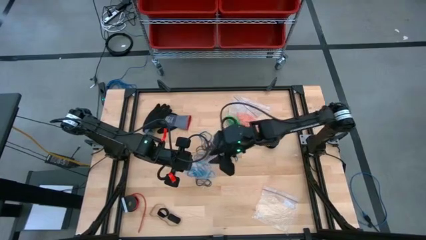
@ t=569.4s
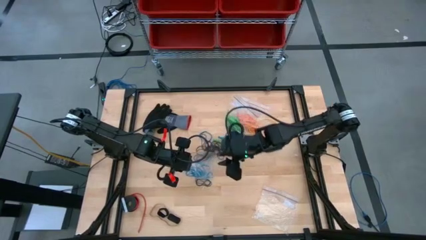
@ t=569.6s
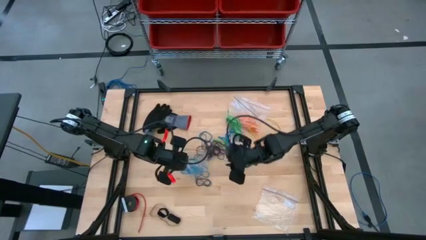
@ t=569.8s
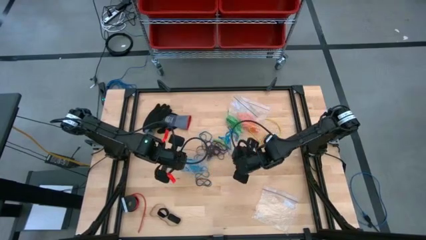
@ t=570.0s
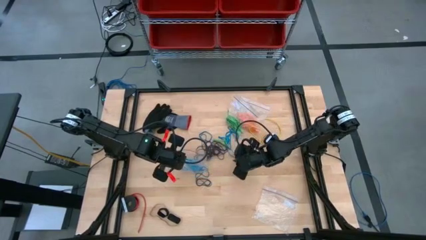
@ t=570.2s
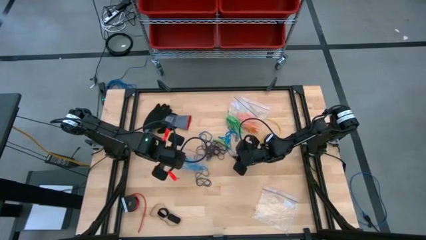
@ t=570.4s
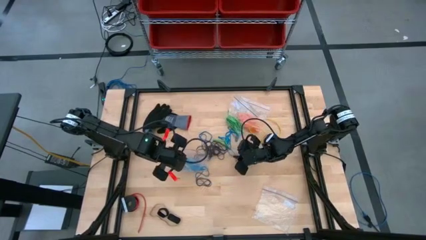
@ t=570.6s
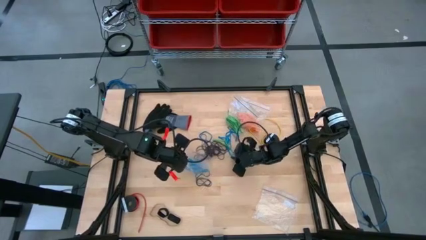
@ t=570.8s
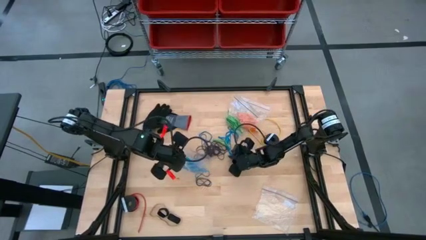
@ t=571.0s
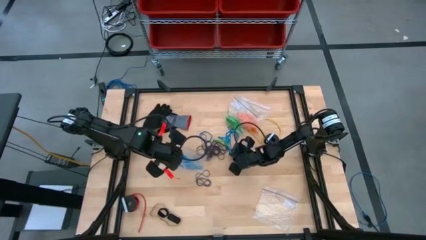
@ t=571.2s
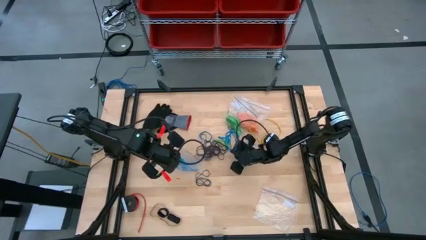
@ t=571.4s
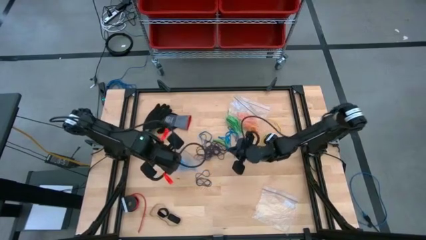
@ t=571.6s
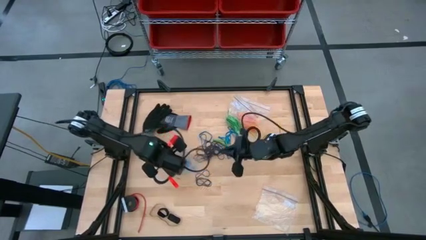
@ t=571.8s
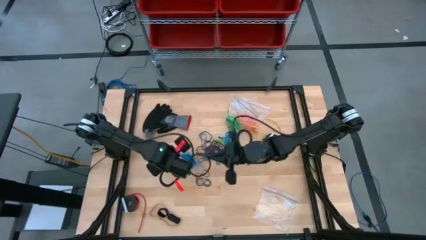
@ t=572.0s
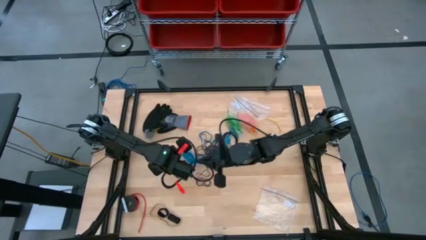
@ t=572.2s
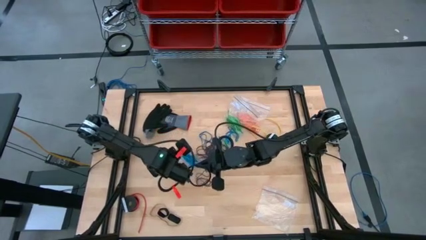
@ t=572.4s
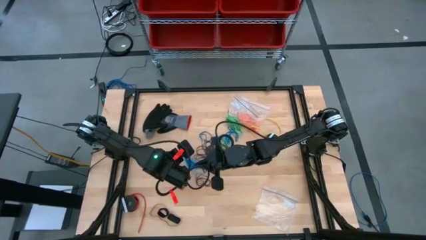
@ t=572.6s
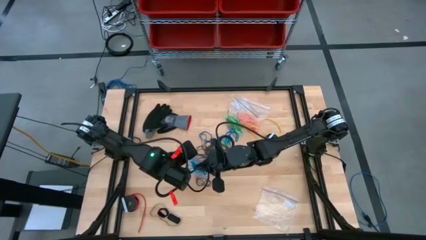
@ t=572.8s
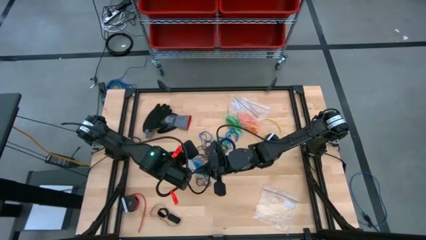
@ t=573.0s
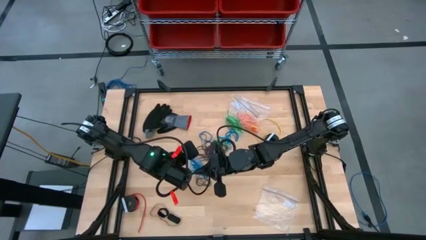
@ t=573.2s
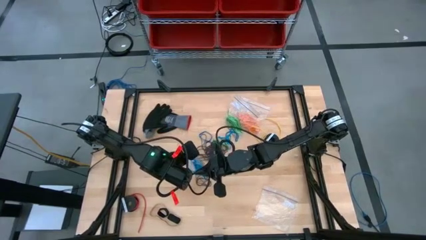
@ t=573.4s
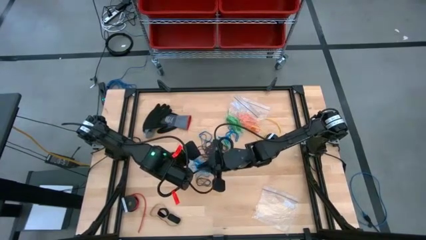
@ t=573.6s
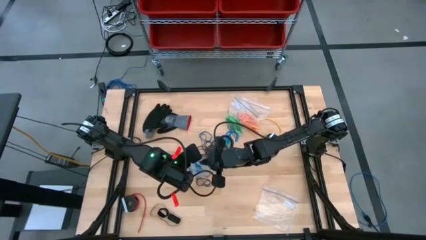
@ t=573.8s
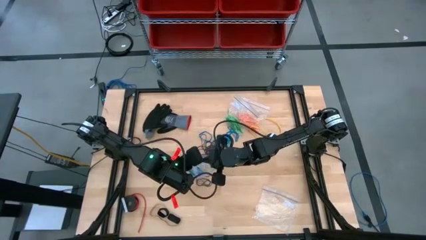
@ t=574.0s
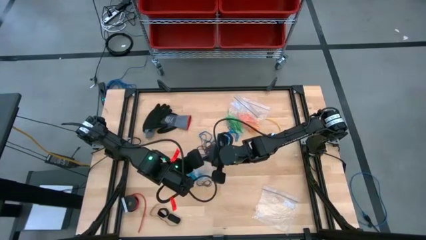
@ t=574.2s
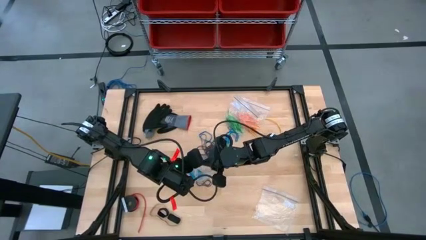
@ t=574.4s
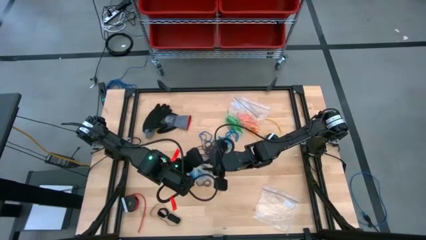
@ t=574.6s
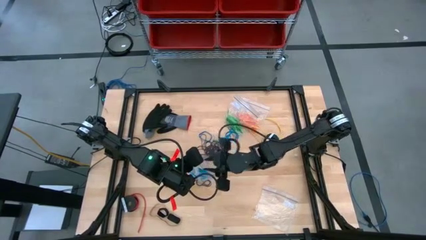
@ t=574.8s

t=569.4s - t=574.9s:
Task: Sort rubber bands
Put the blue rubber band into the transparent zip bag

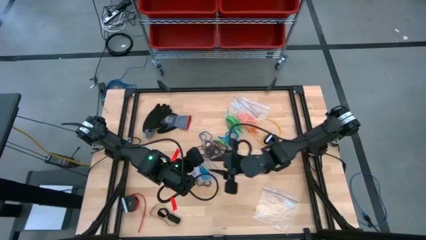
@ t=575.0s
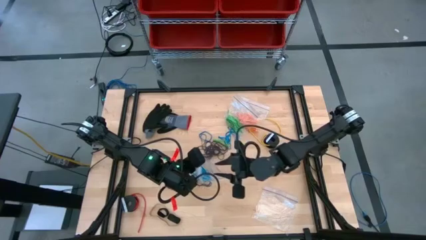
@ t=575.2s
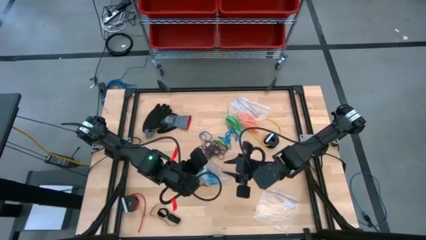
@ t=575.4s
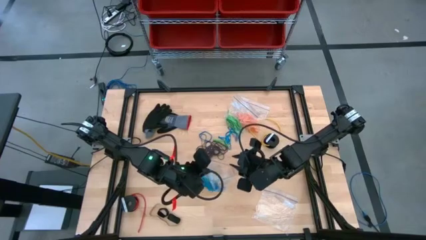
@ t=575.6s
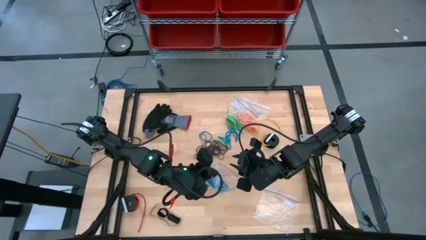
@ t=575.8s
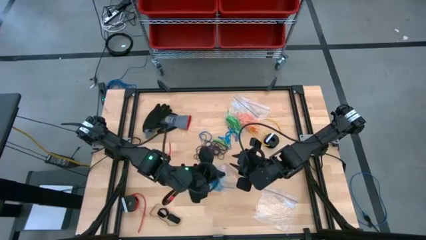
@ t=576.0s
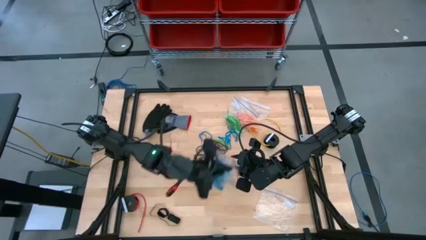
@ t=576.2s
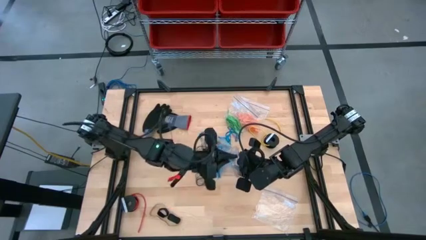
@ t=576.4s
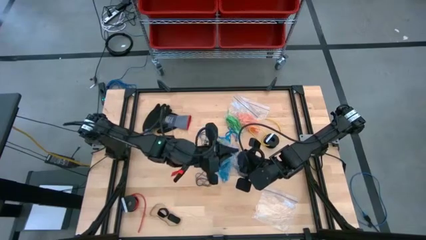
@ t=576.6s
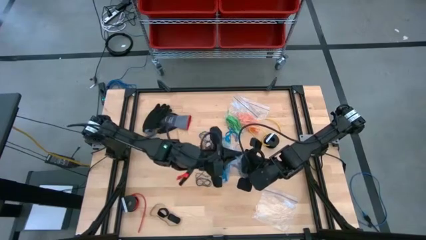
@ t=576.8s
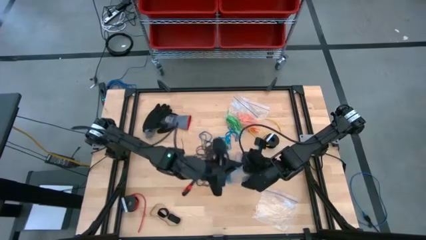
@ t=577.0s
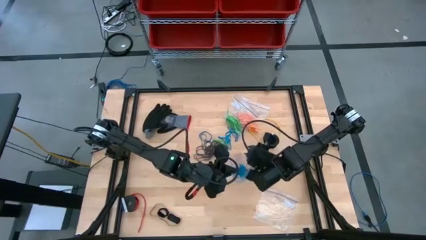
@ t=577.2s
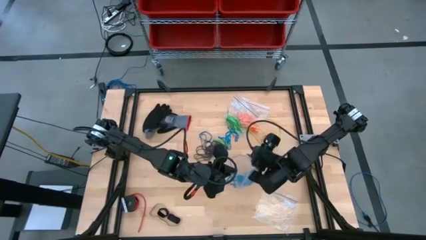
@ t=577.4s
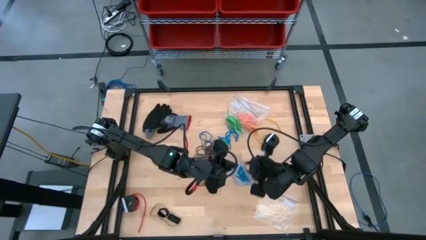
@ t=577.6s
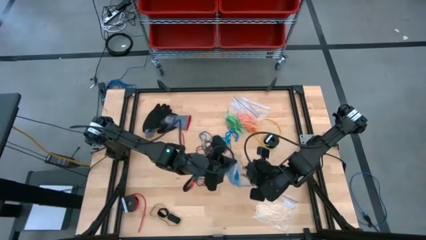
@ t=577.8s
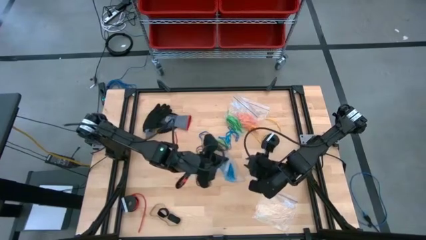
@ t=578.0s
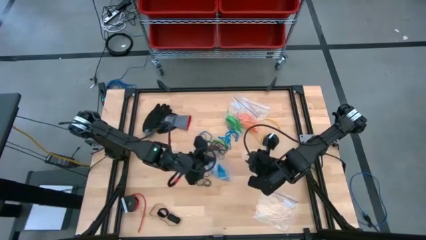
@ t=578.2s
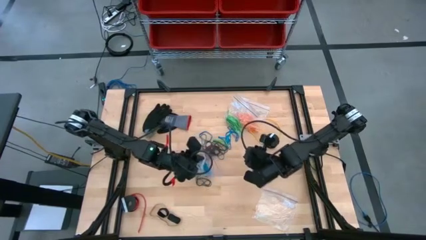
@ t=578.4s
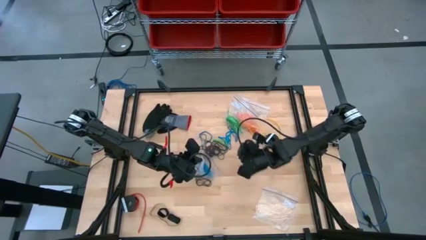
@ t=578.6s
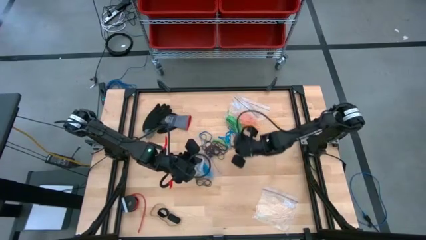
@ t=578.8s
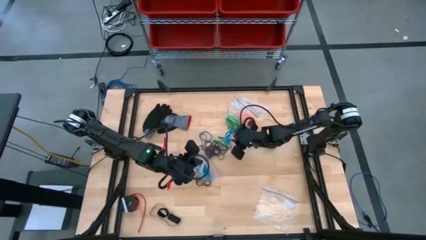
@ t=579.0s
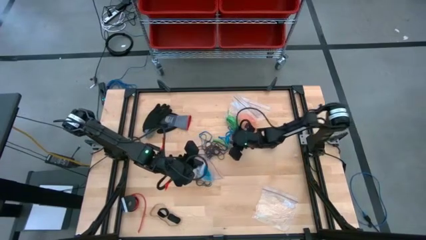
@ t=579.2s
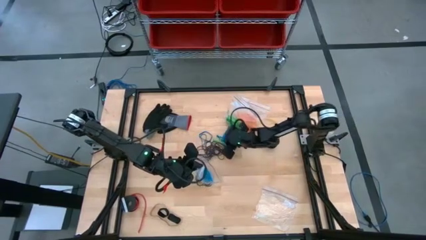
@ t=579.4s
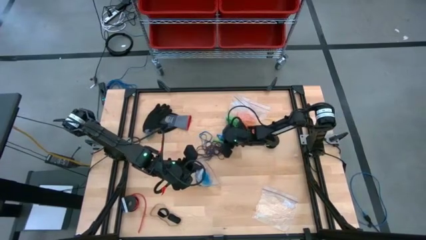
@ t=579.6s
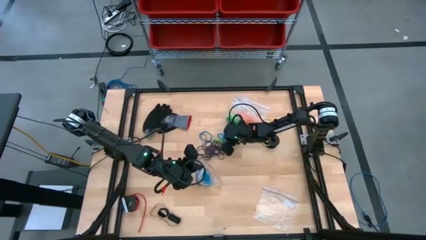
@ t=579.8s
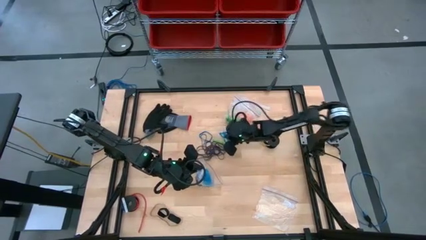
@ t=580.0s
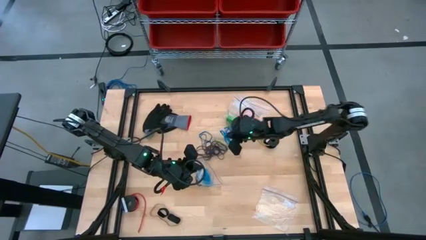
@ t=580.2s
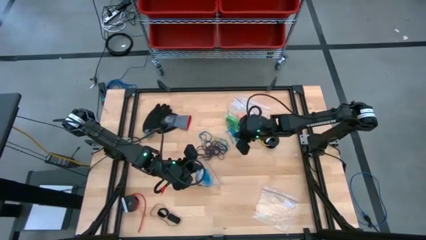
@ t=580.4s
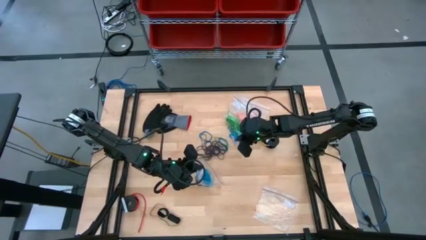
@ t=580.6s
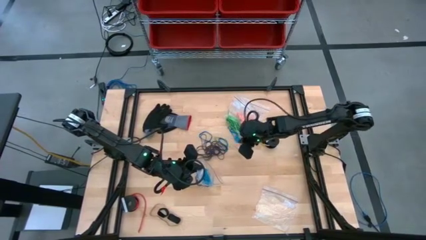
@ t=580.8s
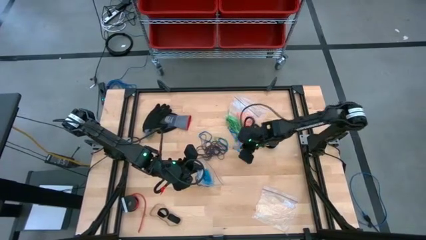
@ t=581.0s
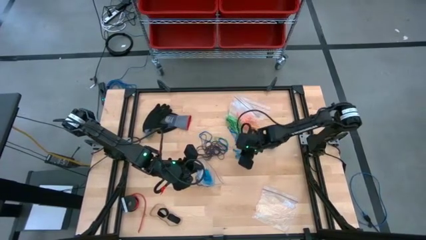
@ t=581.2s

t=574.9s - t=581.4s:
Put the blue rubber band into the transparent zip bag

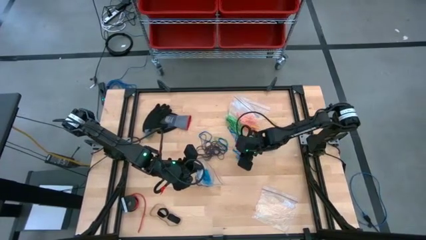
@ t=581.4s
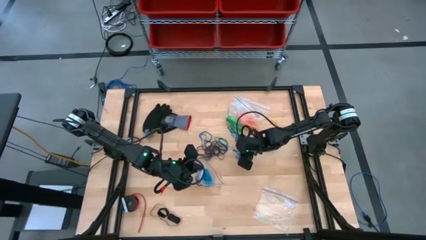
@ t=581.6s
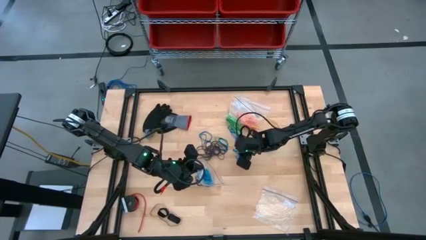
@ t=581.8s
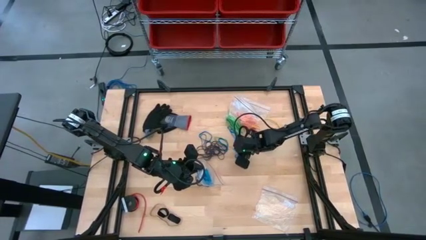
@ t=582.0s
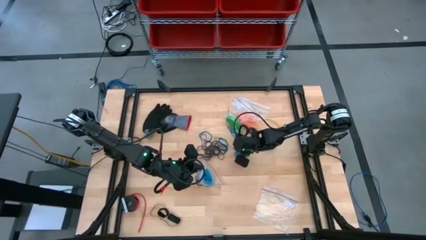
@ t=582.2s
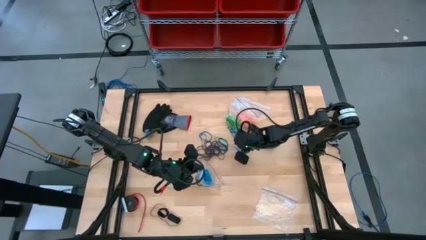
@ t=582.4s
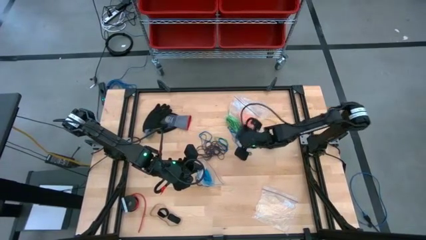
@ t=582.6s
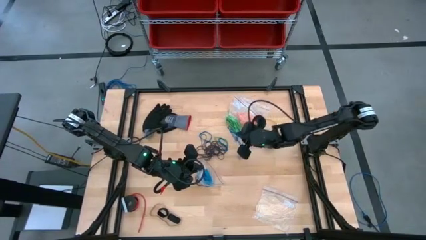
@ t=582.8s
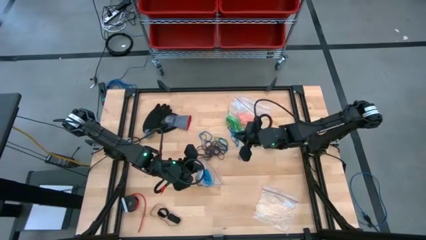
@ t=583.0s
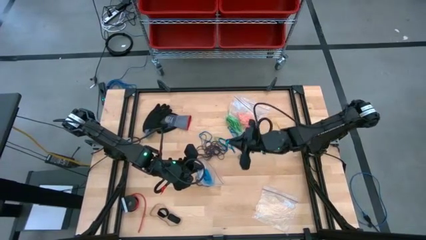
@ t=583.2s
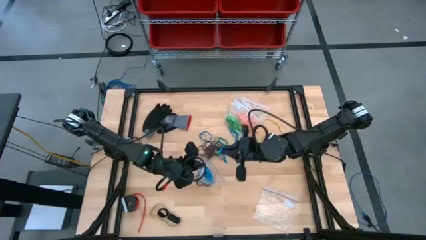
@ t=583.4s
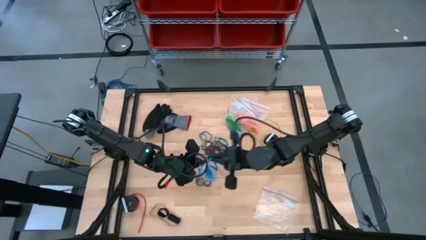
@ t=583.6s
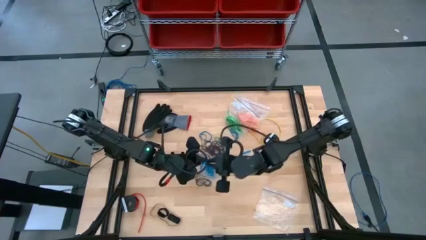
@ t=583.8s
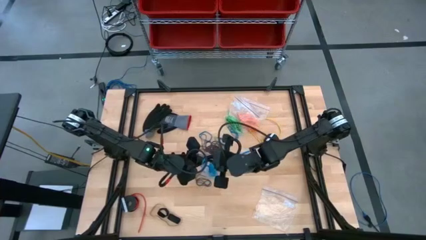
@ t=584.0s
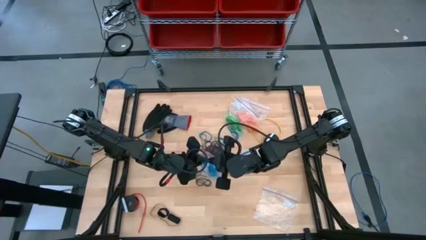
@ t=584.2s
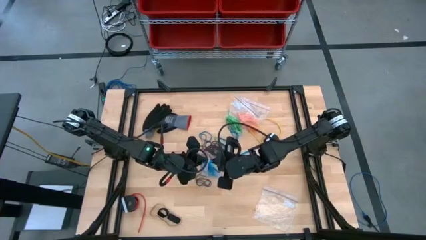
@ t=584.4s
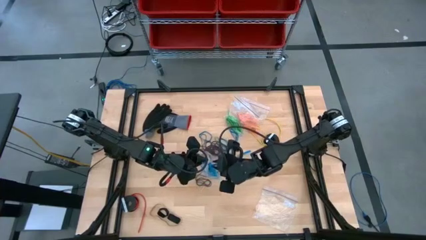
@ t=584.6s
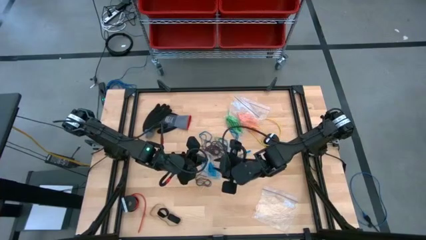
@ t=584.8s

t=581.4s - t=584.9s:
Put the blue rubber band into the transparent zip bag
